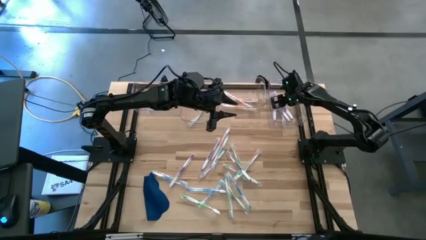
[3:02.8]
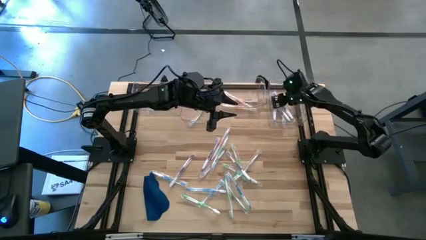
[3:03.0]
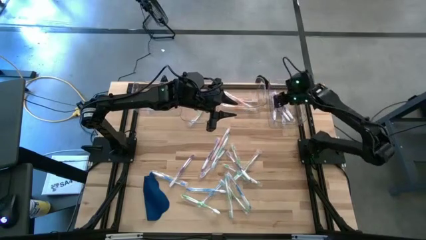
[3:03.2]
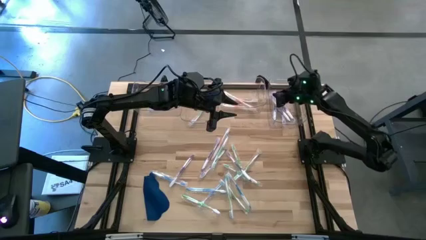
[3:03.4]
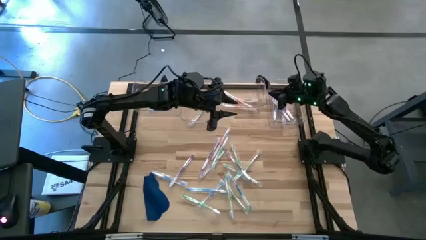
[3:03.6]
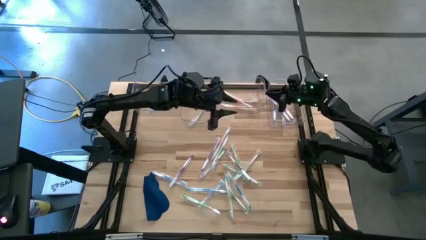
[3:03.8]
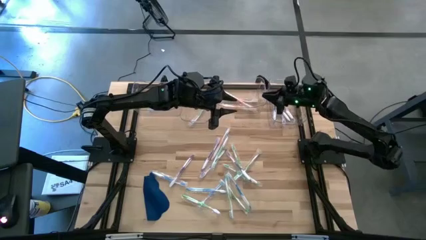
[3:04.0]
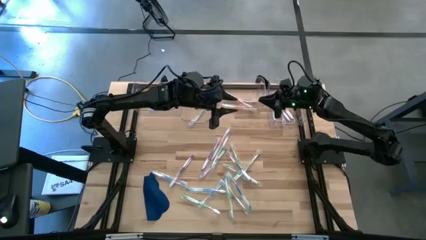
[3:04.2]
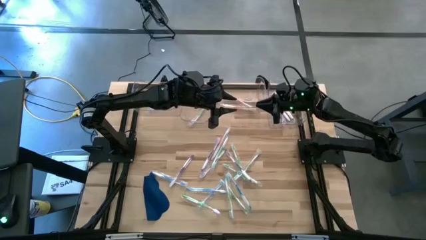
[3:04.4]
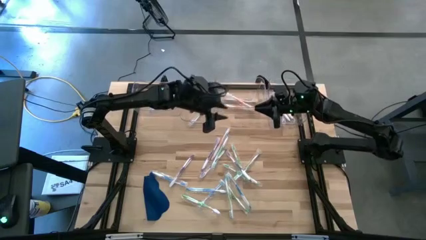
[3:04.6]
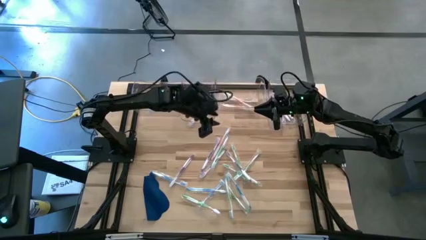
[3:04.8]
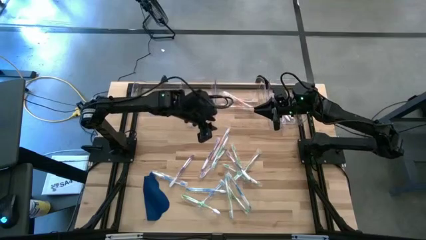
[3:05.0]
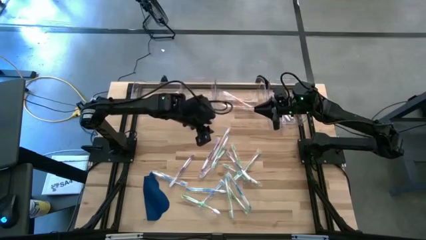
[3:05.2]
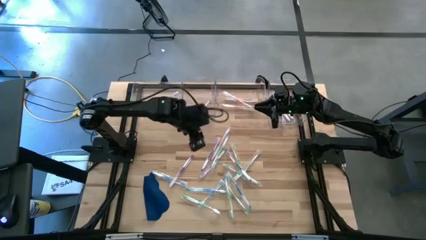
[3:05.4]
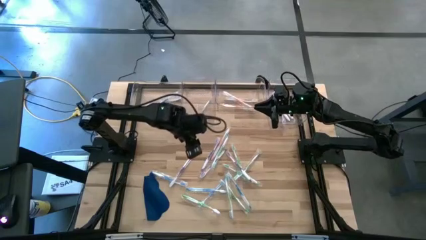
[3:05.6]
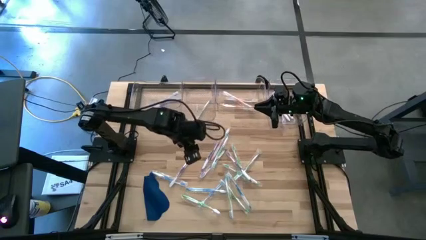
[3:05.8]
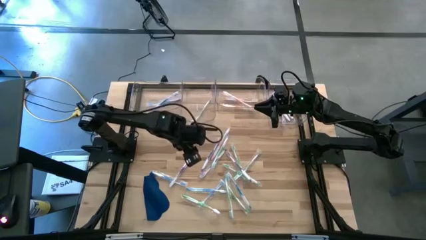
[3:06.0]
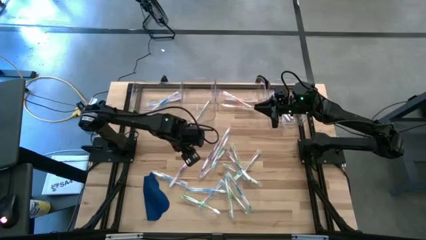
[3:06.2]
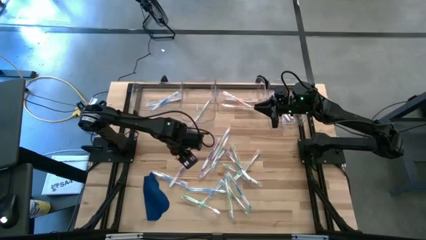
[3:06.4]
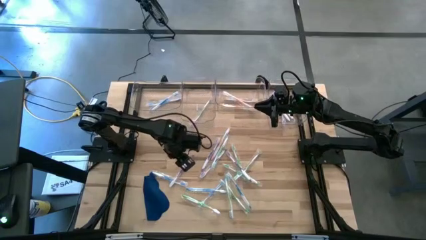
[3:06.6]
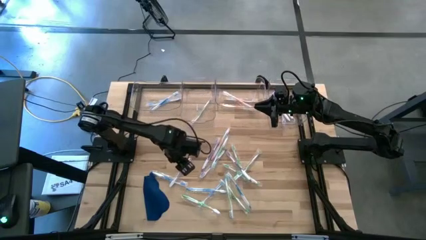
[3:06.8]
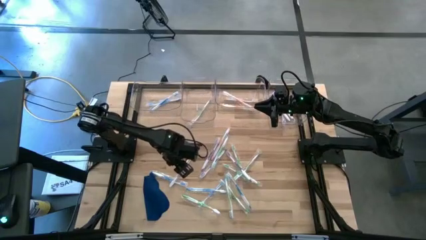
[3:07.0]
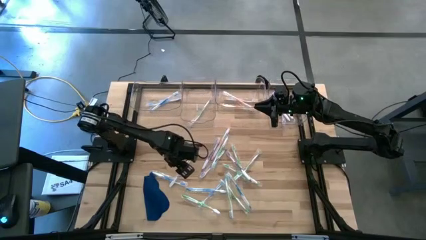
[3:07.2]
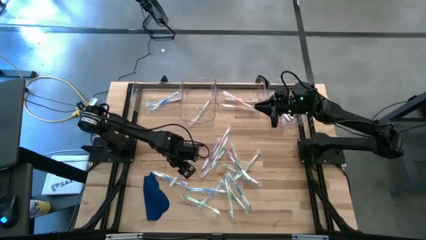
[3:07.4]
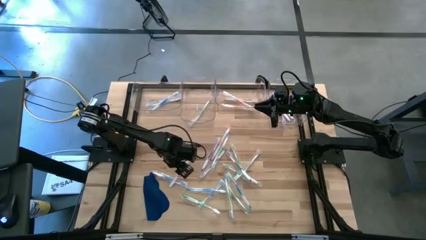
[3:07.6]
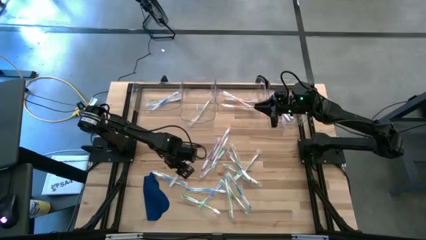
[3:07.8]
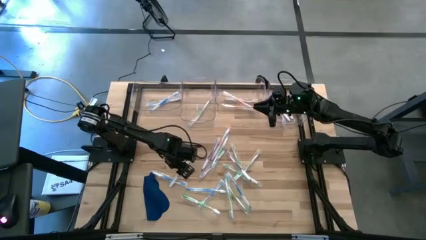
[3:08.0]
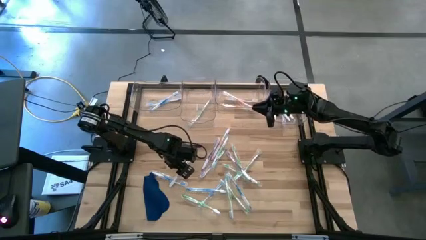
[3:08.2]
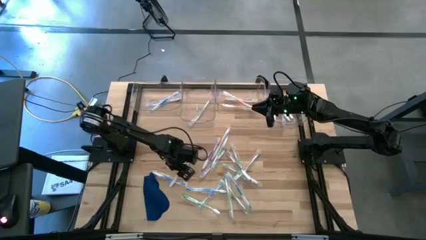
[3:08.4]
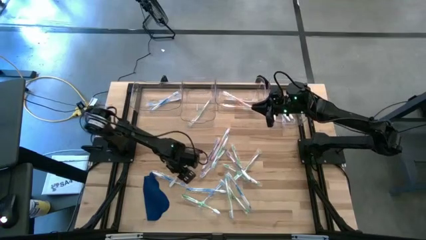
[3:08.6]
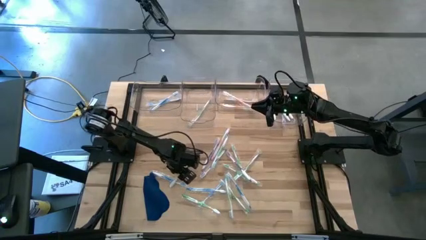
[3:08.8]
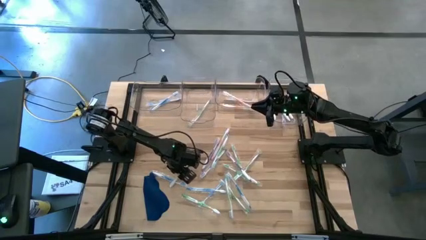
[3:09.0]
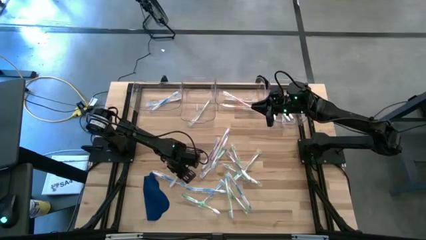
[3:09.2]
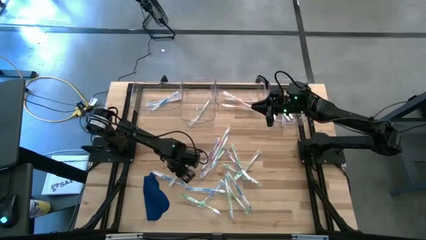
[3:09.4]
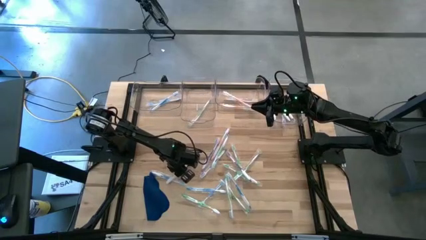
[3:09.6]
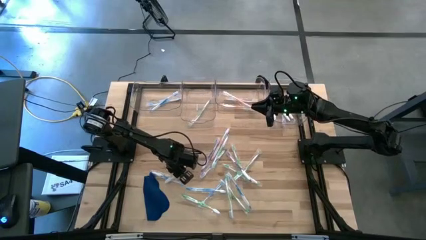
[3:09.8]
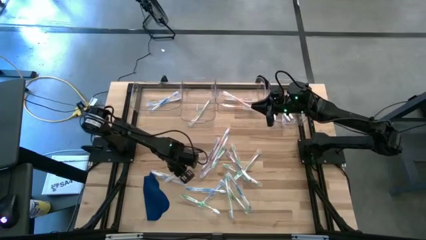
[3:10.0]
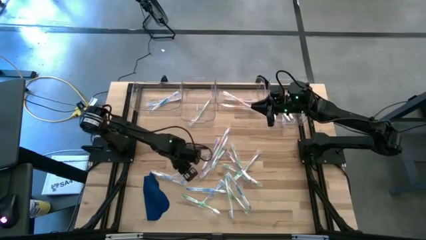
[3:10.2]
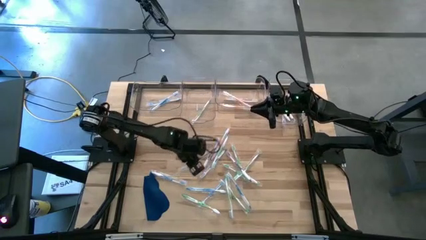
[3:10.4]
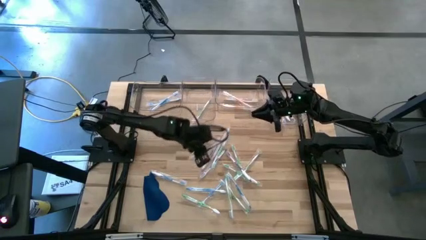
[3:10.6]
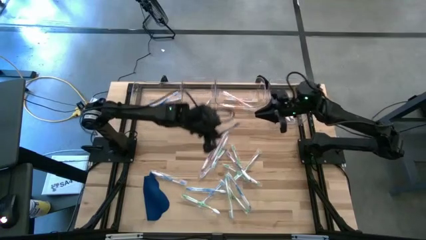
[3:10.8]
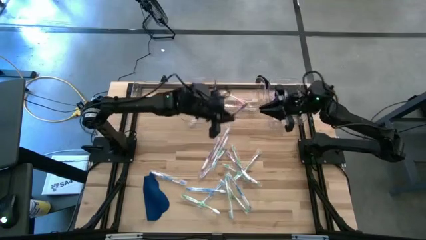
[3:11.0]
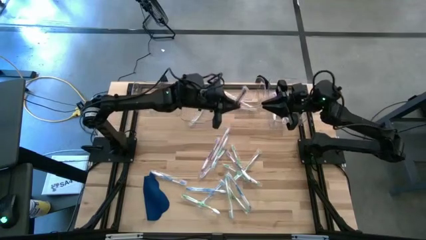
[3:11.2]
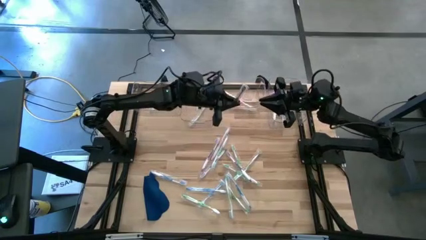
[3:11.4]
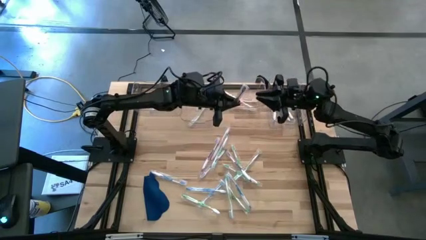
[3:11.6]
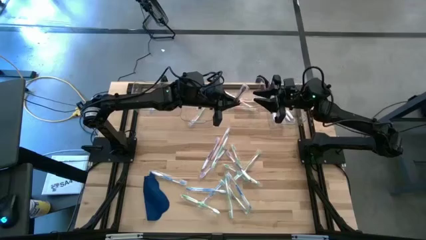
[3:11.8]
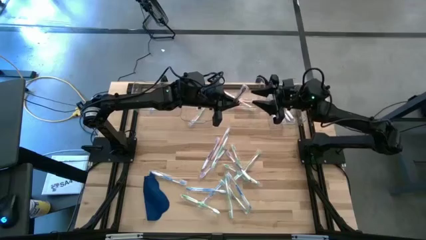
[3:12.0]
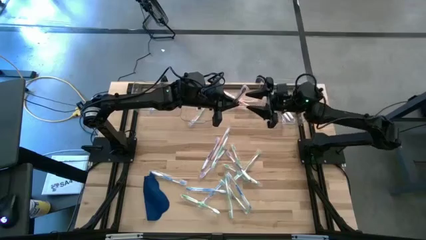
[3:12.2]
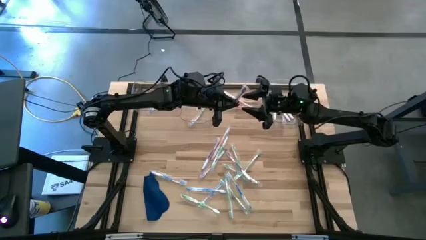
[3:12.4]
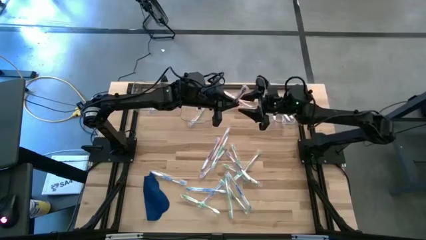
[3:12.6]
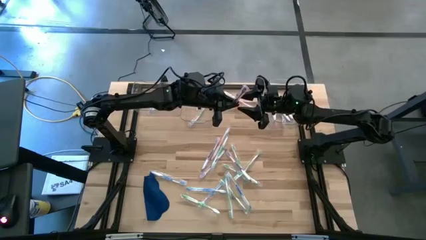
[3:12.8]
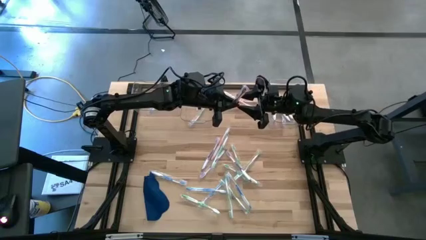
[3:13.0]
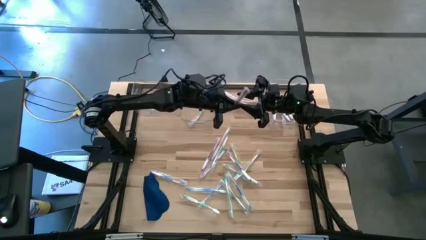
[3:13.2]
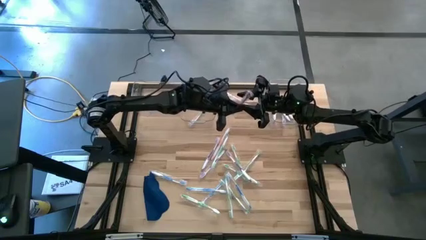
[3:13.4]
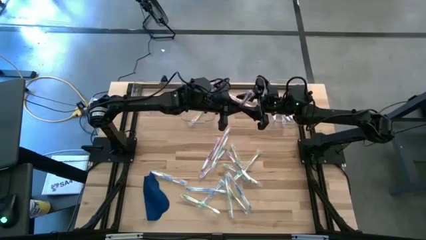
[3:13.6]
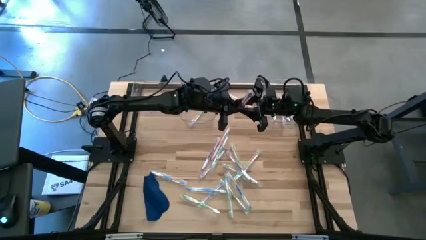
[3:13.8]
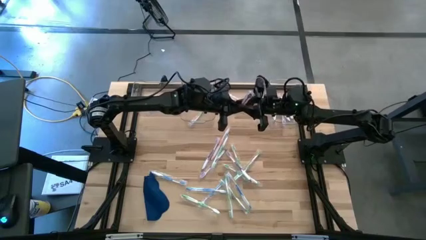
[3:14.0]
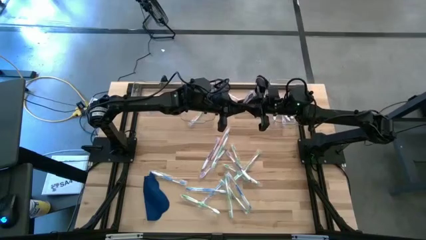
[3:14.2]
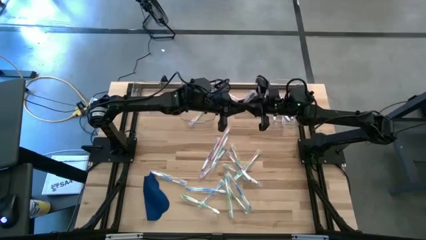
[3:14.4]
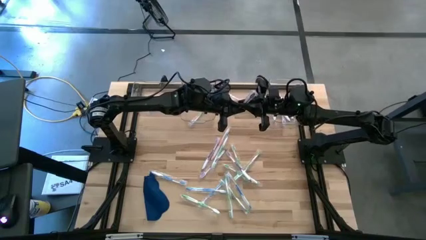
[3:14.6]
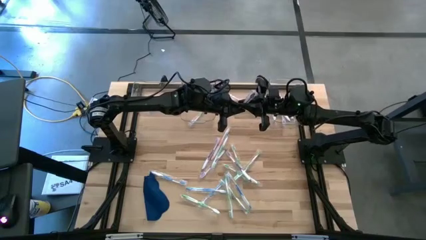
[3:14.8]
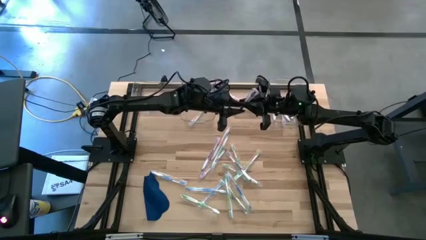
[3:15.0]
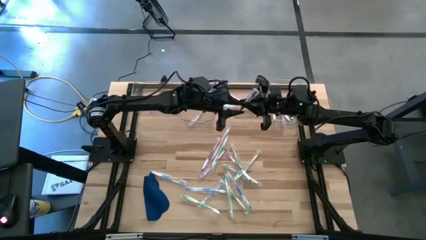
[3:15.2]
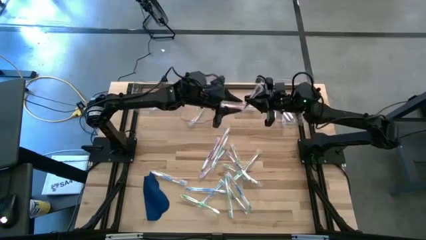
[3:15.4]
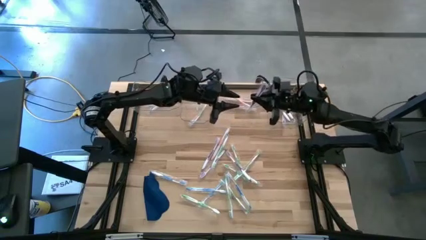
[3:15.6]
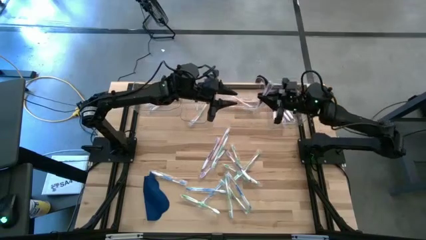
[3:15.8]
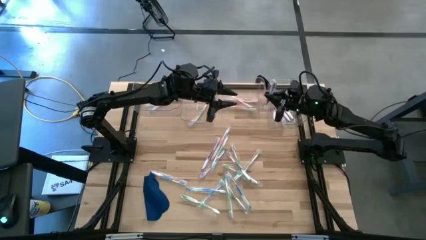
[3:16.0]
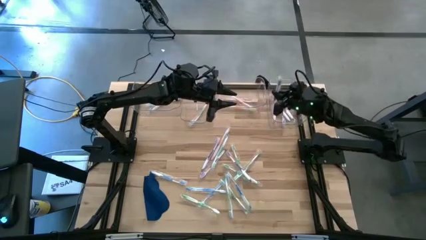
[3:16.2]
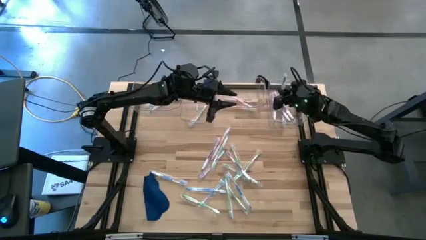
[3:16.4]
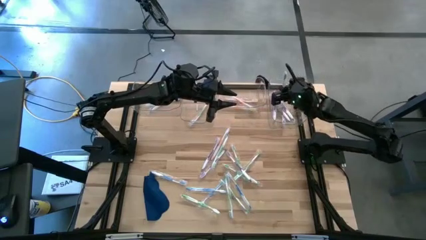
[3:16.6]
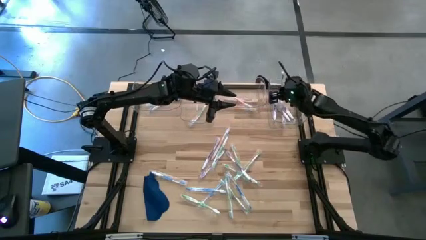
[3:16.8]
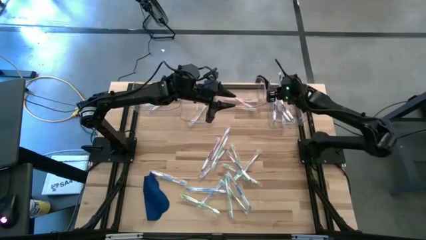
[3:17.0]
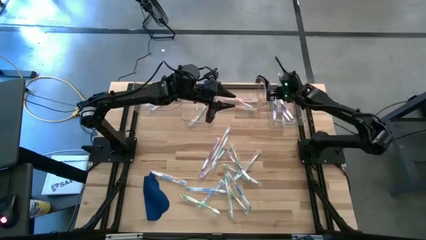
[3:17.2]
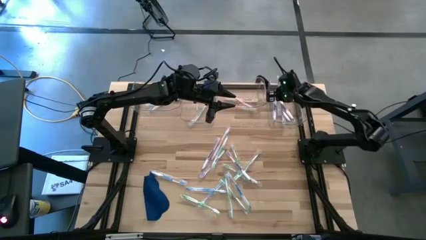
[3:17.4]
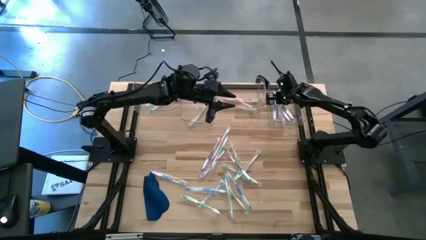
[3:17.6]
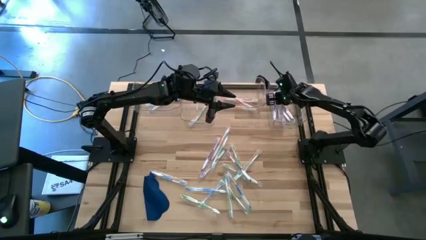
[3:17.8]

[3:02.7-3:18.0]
Task: Pick & Place Toothbrushes
Put the purple toothbrush into the right transparent bin

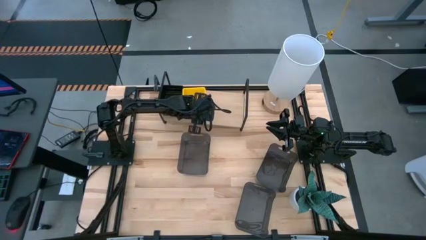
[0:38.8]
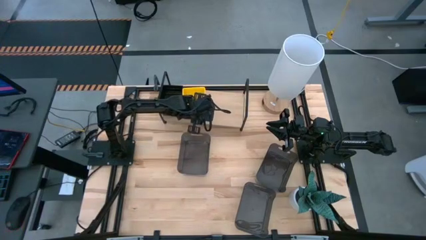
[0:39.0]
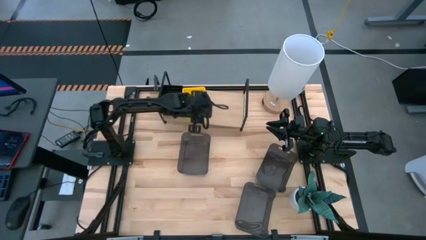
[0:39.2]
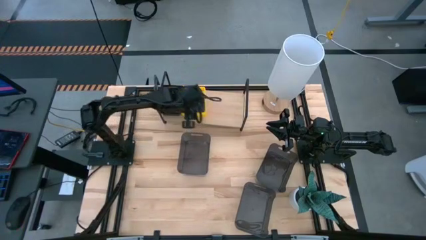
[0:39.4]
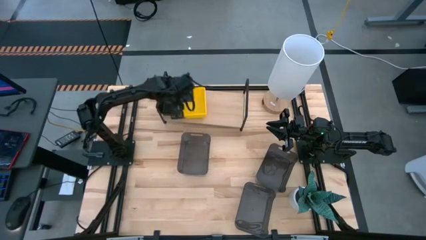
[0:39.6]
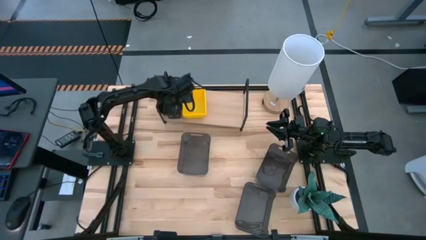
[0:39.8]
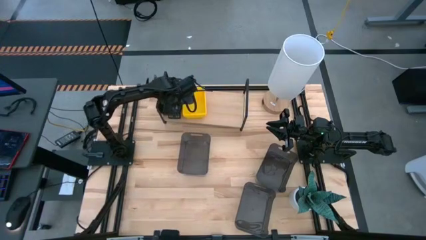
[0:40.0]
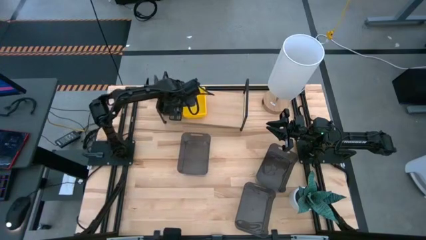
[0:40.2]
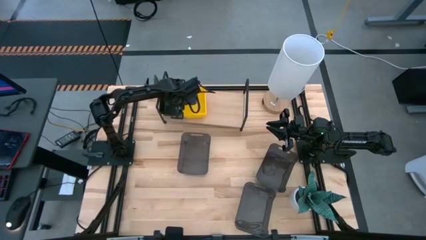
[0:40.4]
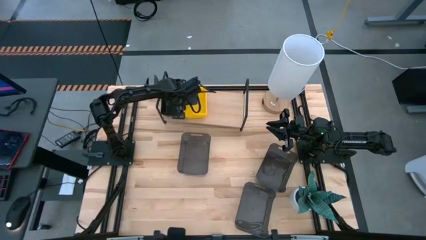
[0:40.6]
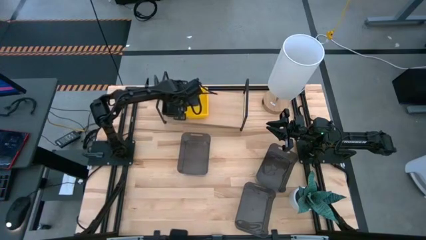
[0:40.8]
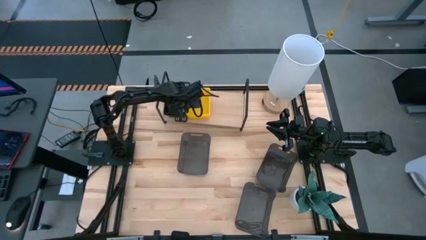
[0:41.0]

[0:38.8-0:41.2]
Task: Stack baskets on shelf by color
Adjust the black basket
